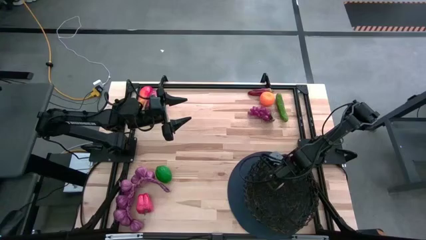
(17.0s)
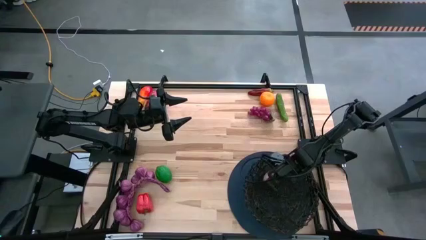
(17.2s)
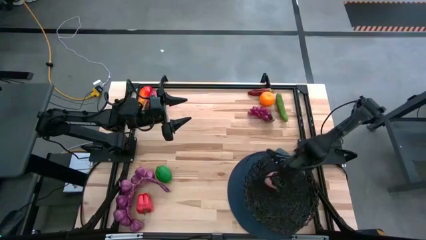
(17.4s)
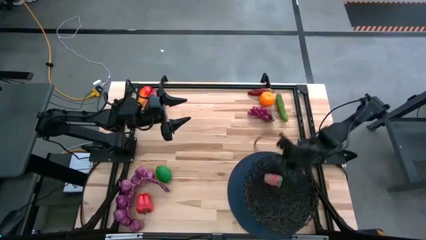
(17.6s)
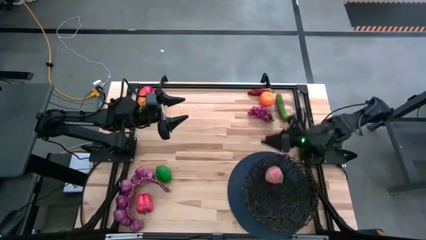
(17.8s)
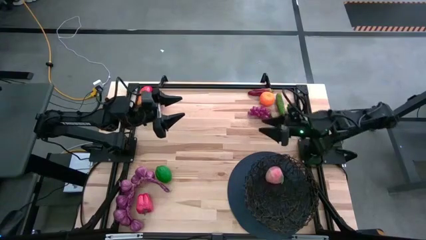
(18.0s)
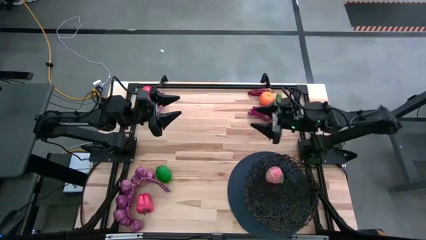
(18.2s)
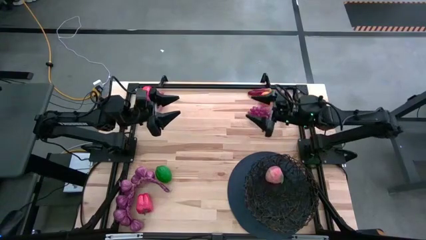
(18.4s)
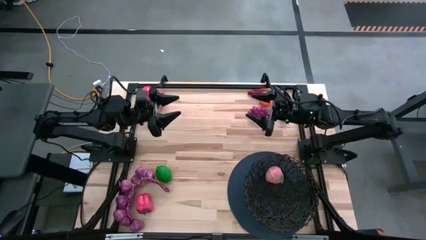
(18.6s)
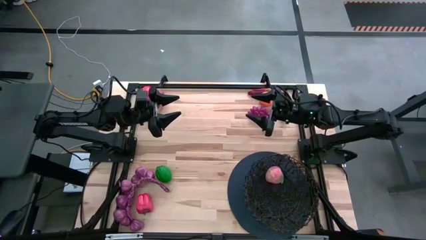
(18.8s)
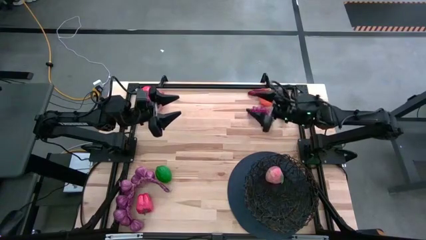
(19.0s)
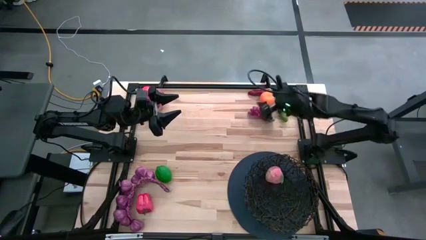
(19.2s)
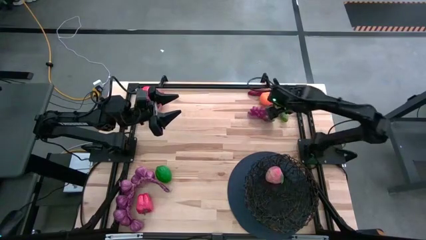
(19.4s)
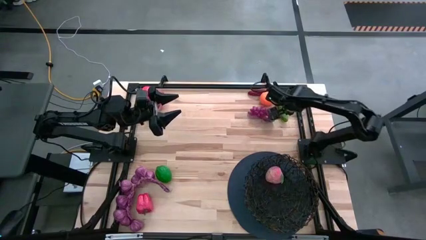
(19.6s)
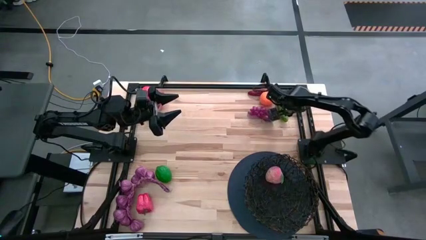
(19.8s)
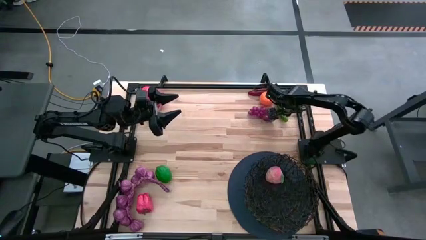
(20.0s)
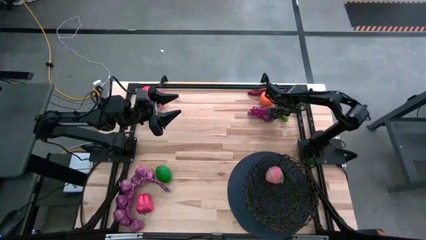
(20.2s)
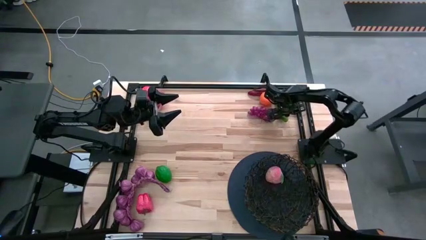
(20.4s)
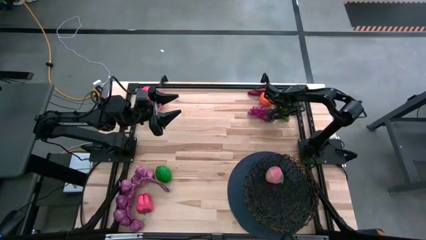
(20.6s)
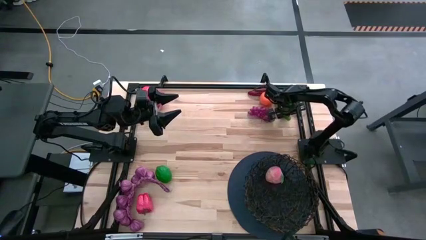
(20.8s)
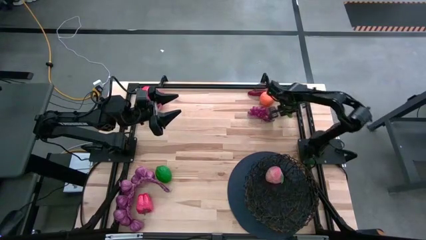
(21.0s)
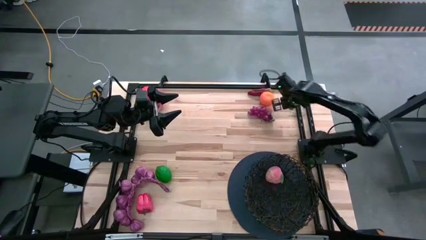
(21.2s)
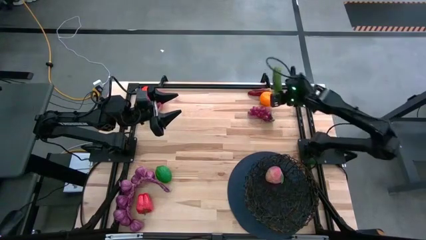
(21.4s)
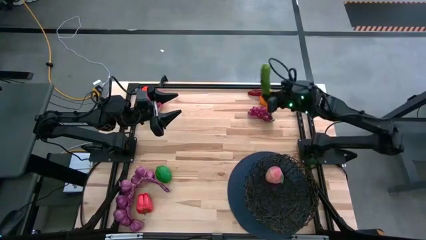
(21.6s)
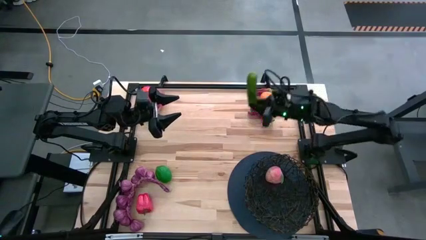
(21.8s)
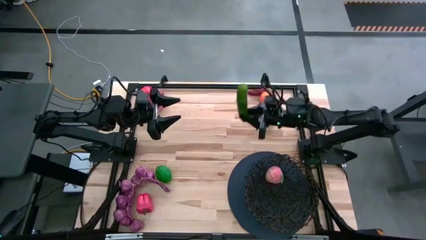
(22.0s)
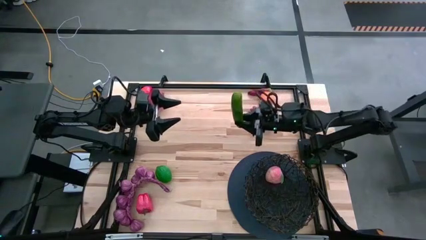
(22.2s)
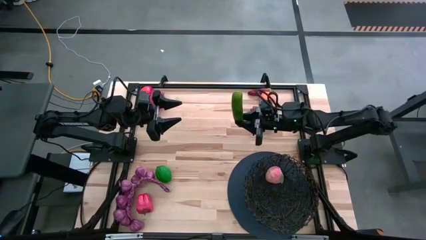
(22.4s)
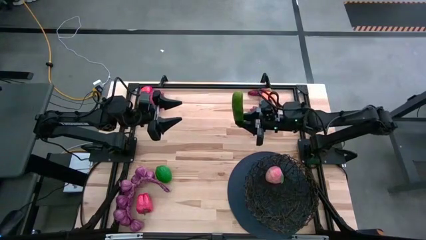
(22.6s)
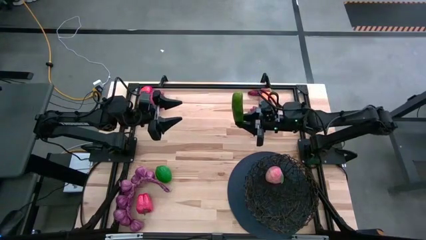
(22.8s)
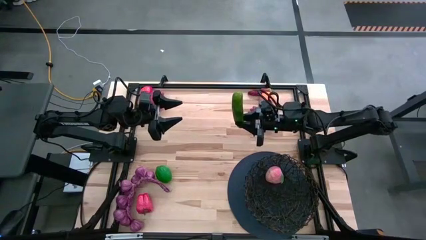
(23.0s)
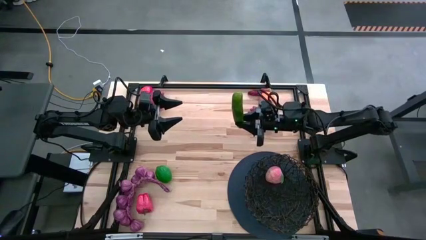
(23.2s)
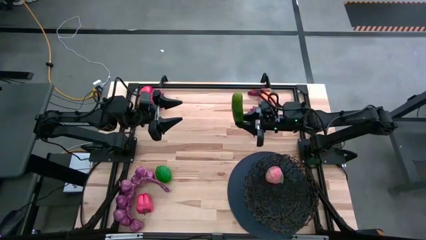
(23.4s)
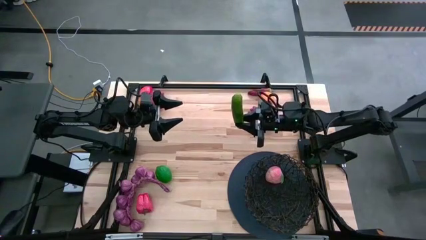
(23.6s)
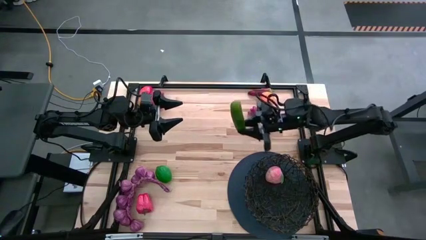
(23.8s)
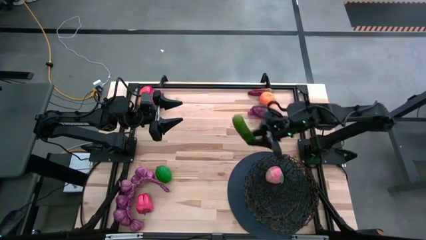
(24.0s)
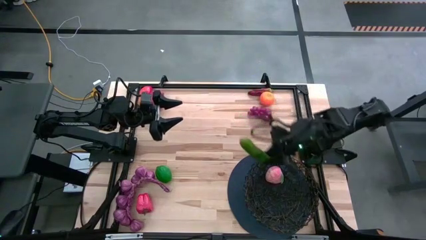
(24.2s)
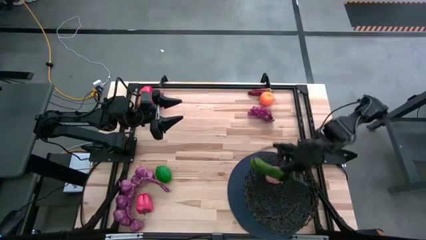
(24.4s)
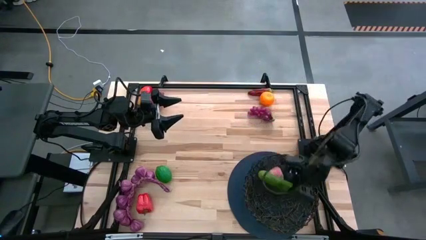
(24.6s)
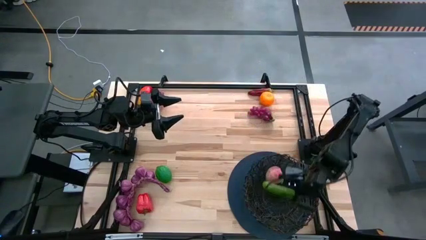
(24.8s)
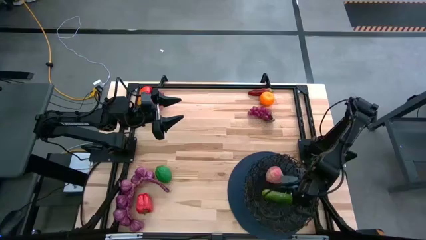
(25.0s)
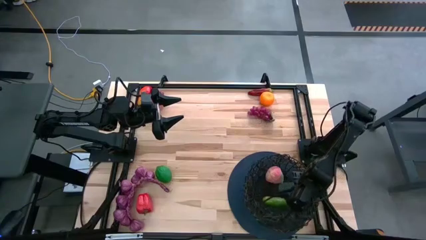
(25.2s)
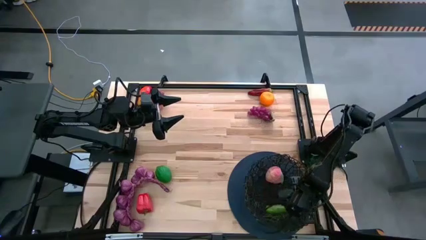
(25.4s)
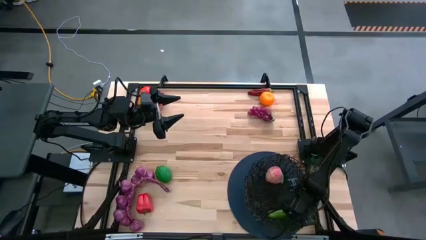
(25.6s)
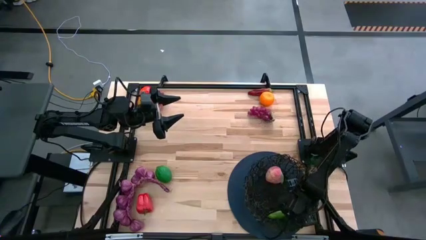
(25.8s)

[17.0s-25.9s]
Task: Build produce basket
Put the green cucumber into the basket

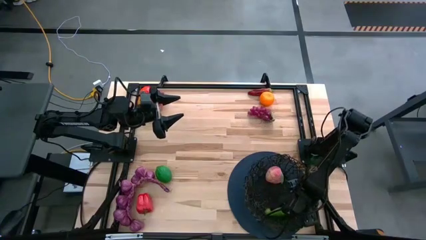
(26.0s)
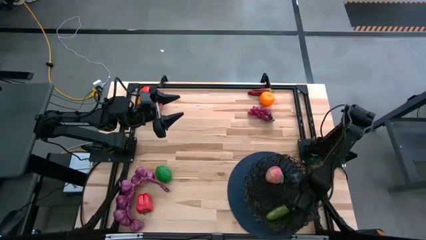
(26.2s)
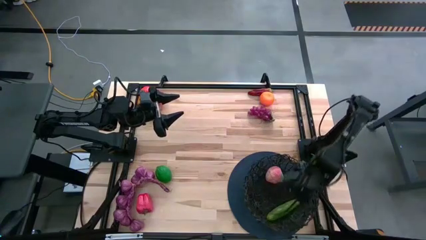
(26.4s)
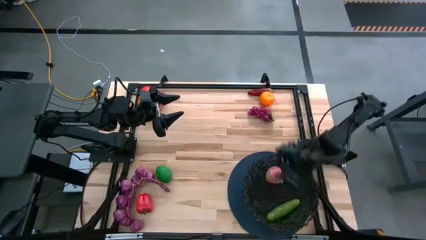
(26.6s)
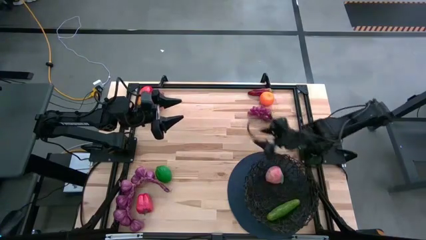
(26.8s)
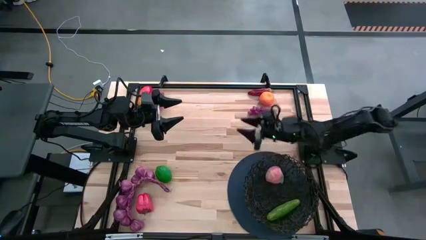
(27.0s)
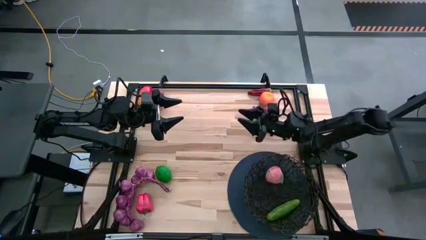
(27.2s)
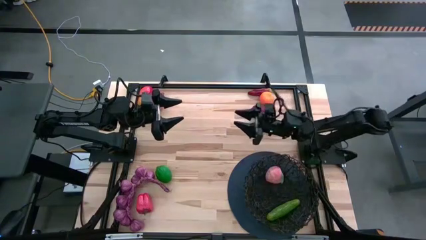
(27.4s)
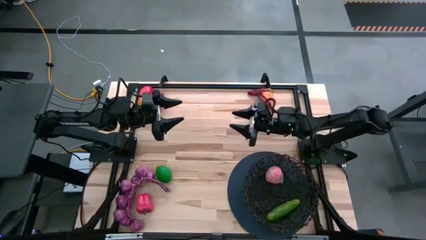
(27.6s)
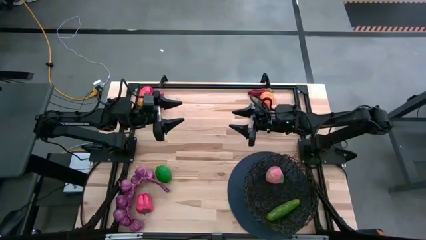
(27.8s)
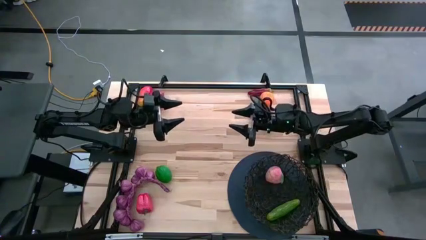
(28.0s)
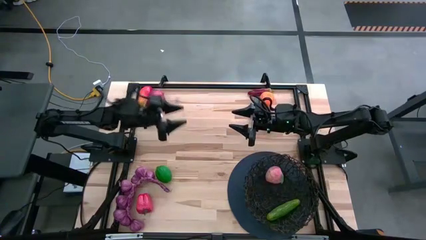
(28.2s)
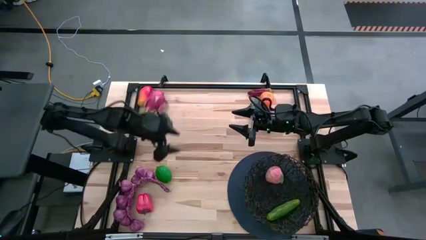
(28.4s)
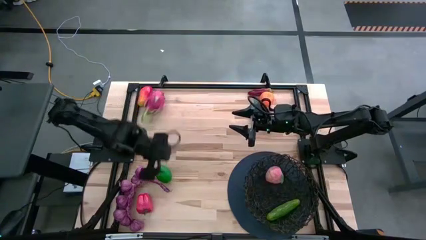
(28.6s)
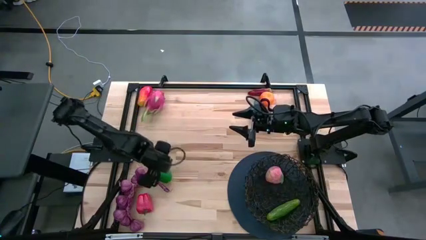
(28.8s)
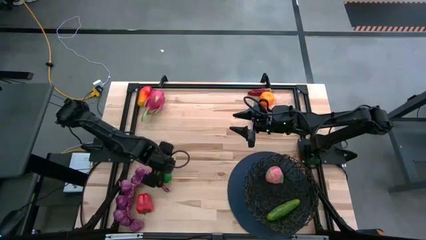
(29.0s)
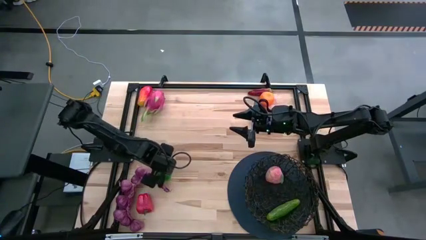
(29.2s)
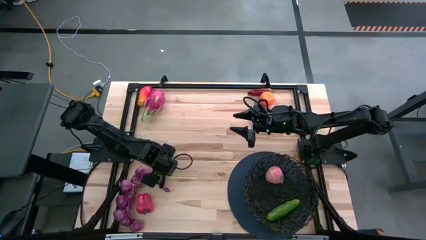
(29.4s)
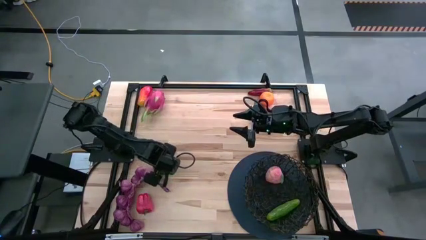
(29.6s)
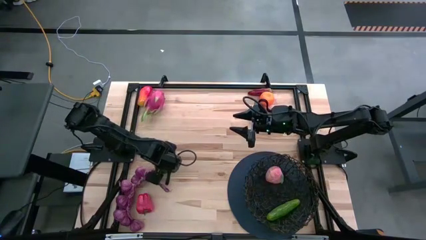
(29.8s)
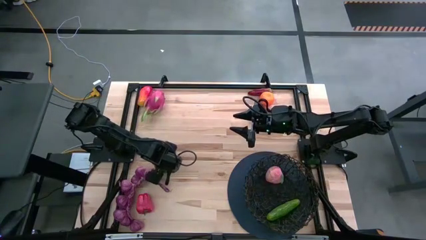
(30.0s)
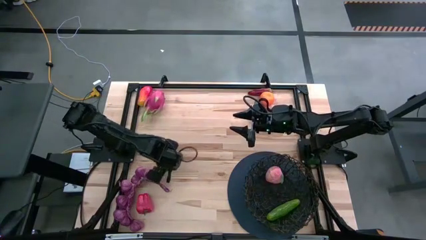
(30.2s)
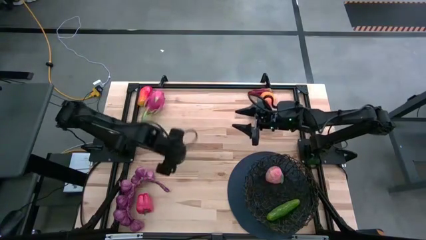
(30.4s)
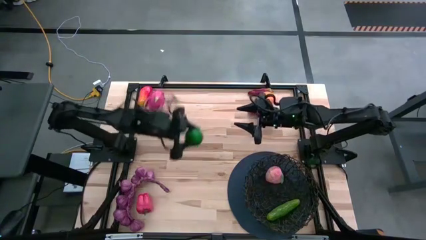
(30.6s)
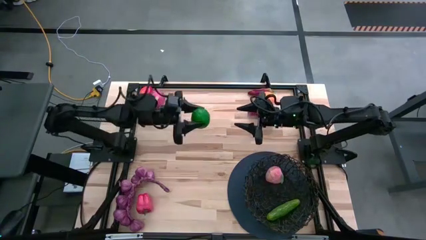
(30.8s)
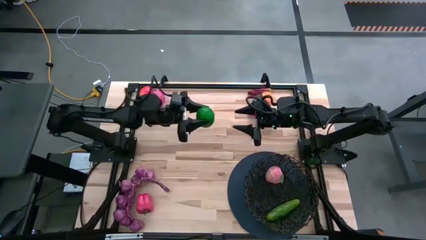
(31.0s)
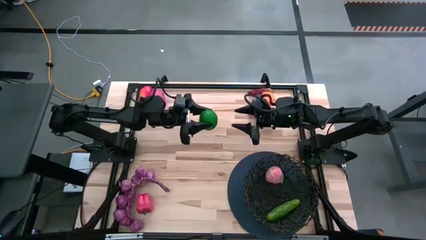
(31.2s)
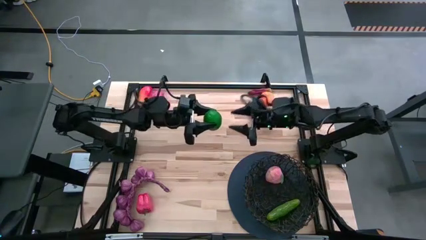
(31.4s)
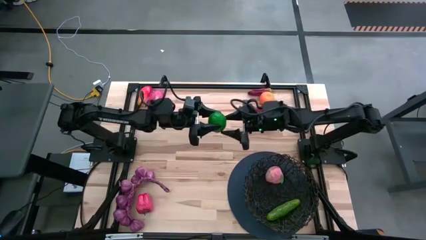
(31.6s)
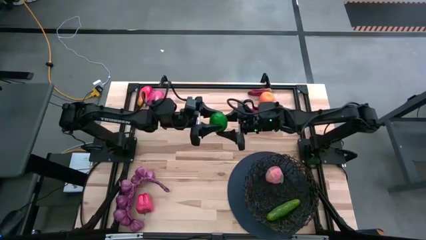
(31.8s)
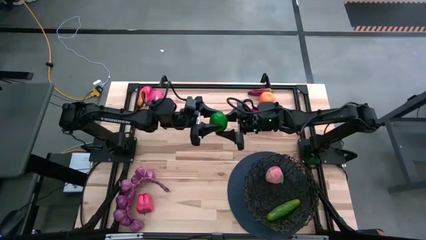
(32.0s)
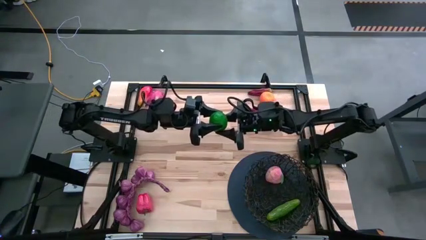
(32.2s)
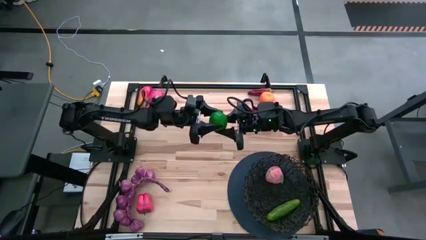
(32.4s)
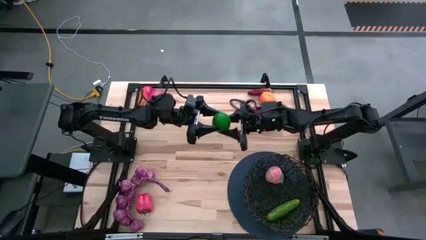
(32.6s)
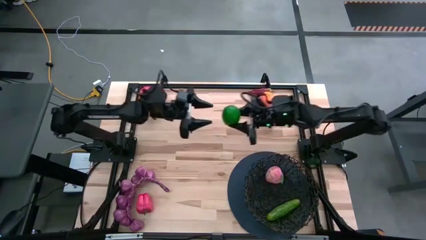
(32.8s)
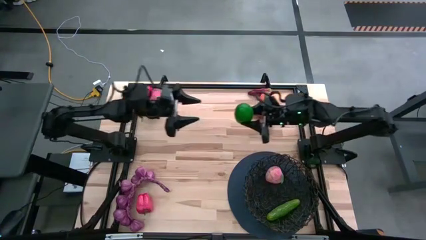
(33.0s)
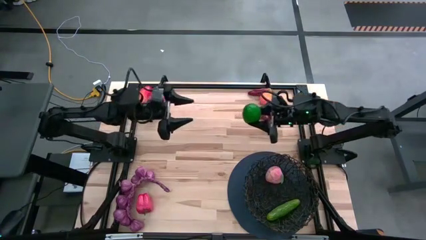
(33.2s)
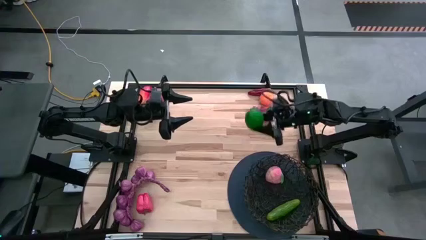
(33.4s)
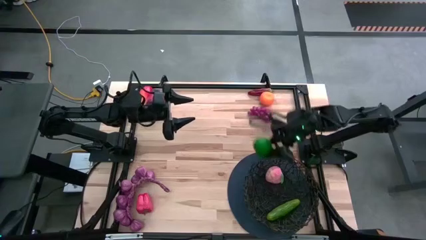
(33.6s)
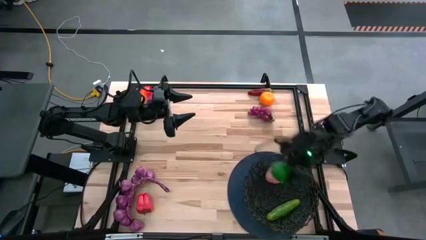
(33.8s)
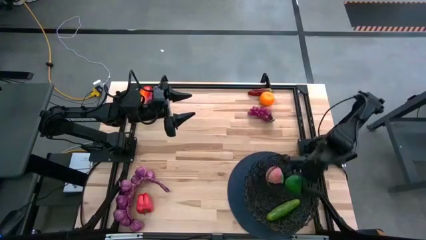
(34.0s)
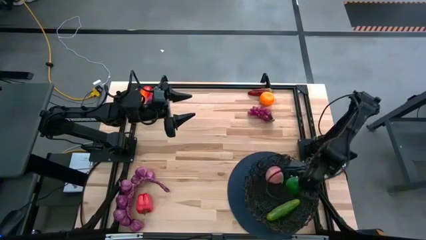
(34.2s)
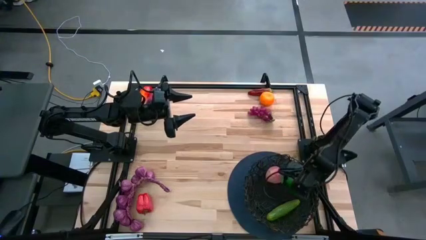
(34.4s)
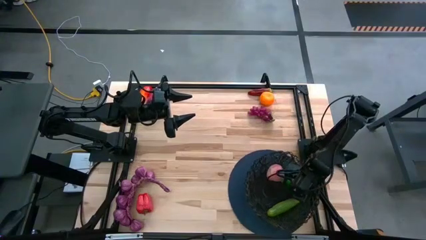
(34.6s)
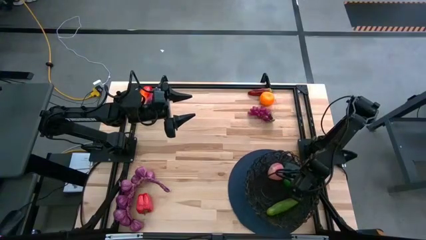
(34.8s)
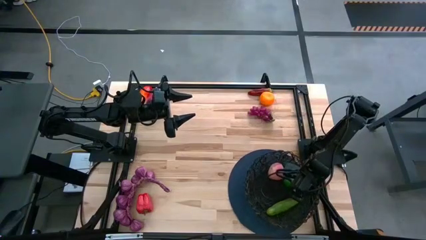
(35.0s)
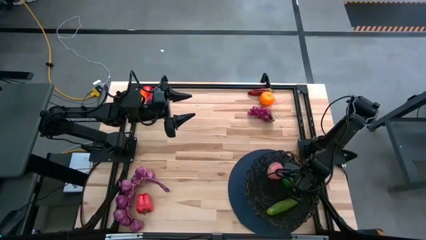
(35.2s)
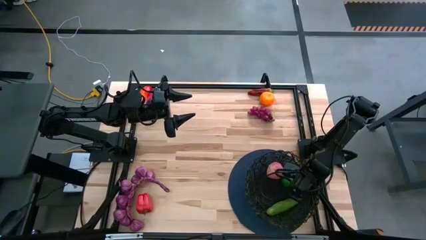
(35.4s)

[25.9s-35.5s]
Put the green lime into the basket
